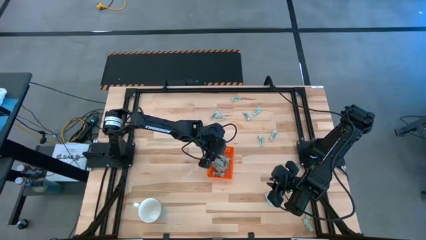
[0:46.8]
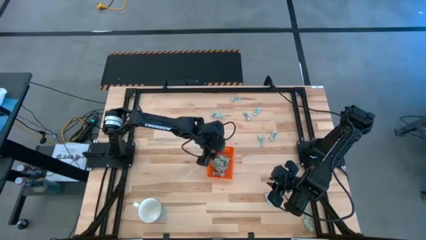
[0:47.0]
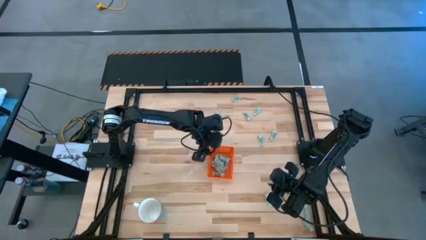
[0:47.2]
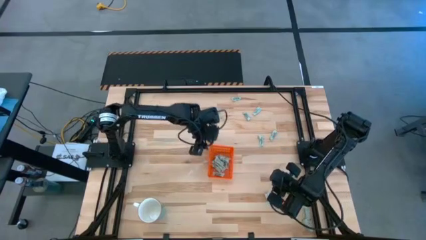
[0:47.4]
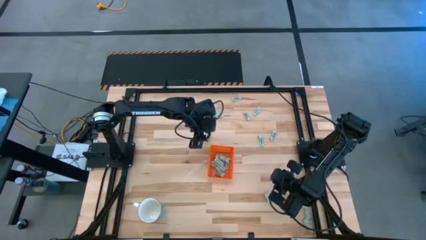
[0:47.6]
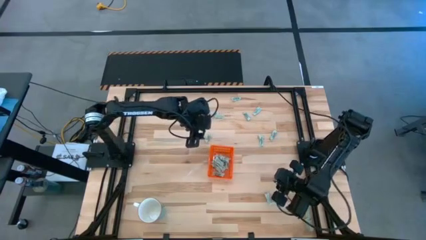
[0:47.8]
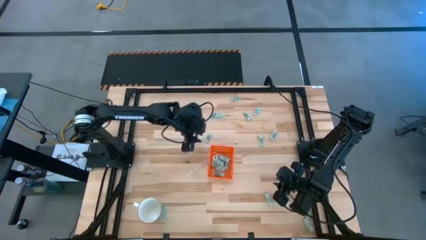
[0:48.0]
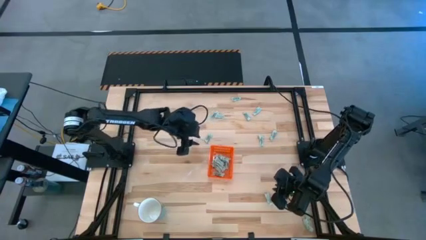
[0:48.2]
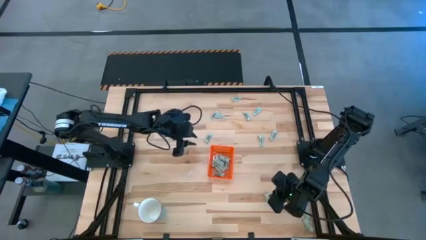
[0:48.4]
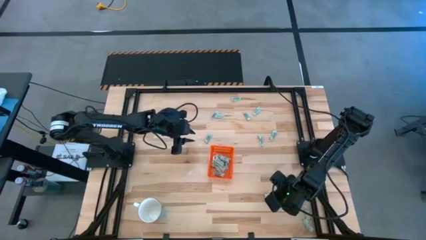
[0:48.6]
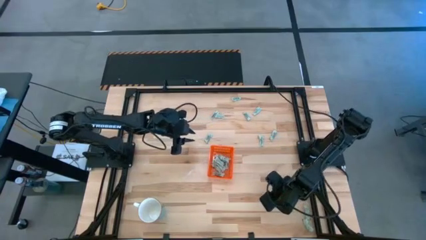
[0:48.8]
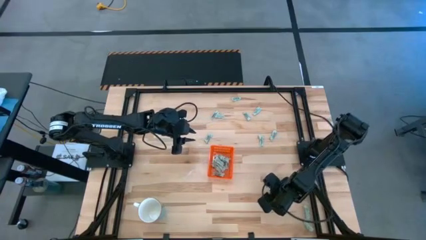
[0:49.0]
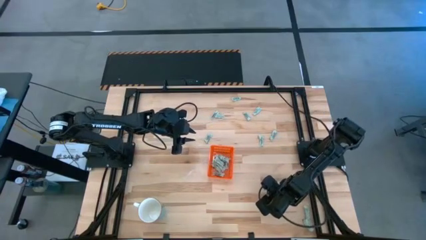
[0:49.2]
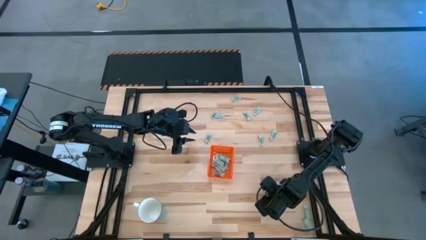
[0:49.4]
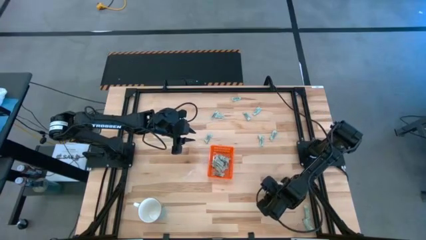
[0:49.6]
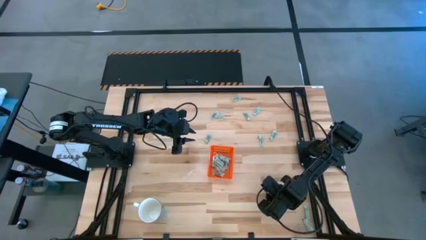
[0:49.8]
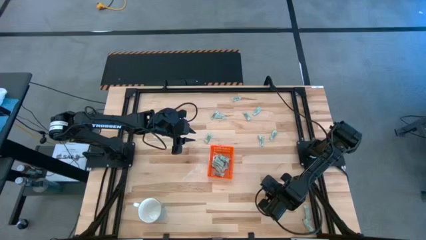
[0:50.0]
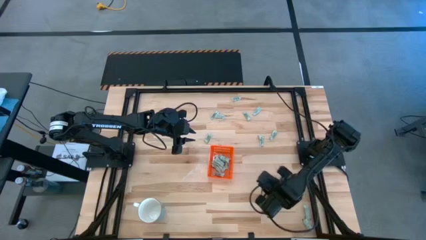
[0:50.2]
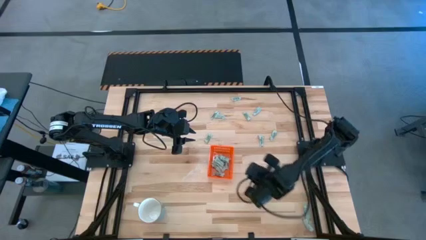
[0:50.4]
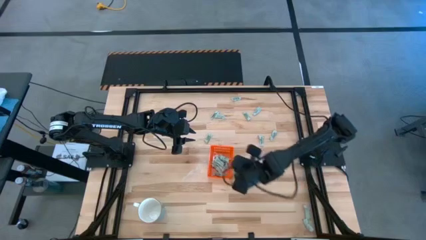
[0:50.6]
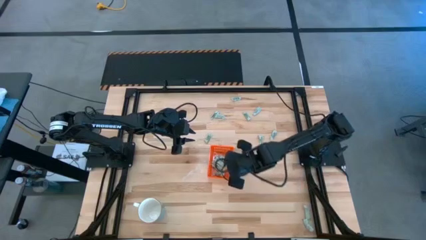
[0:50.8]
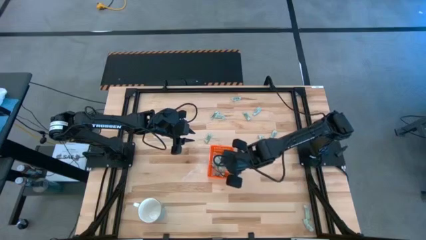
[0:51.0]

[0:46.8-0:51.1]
Task: Pick and place Stevia / Truvia into bins
Put the stevia packet into the orange bin

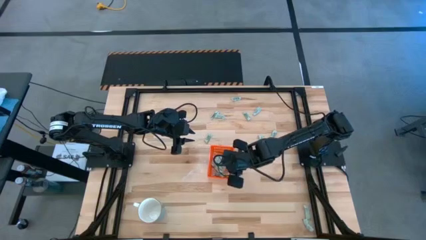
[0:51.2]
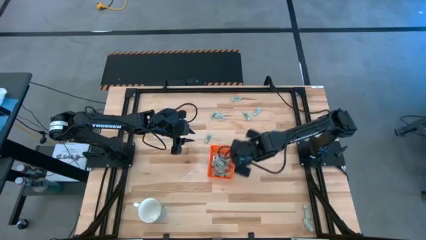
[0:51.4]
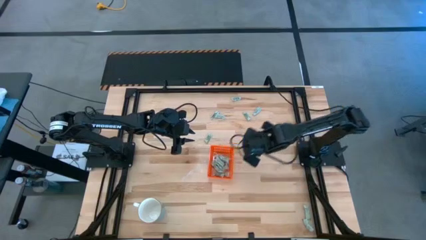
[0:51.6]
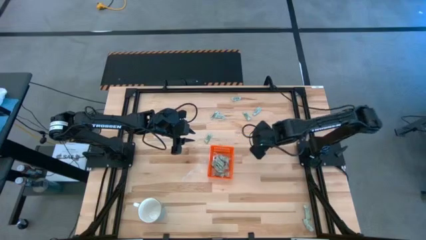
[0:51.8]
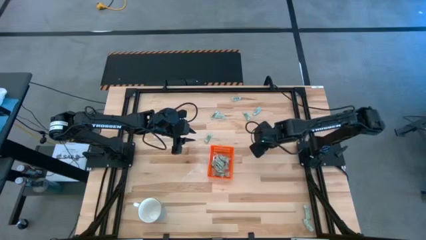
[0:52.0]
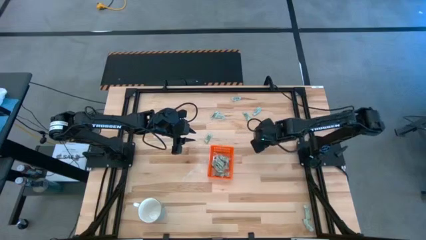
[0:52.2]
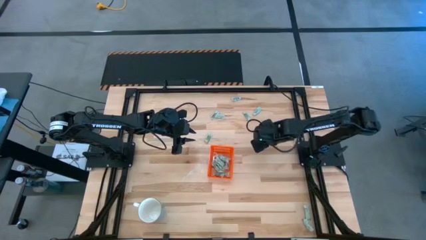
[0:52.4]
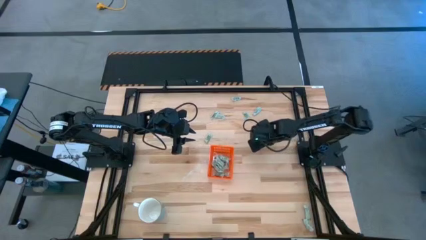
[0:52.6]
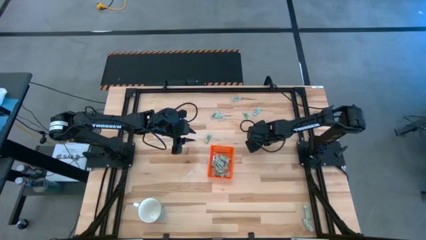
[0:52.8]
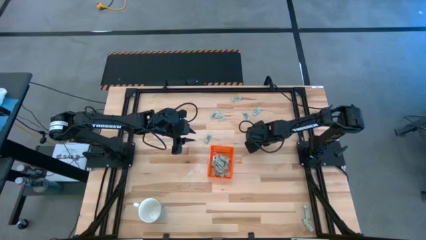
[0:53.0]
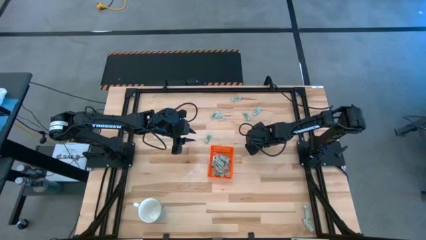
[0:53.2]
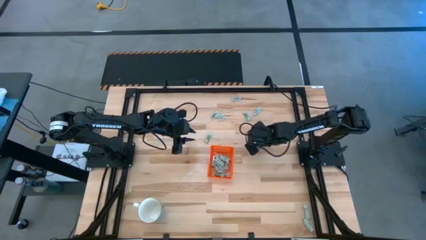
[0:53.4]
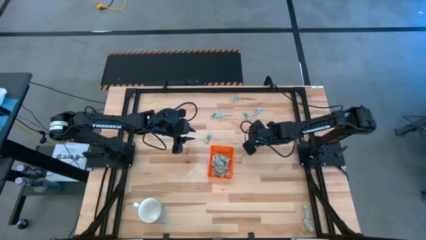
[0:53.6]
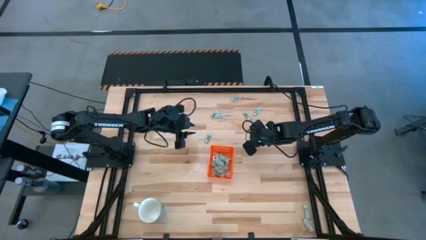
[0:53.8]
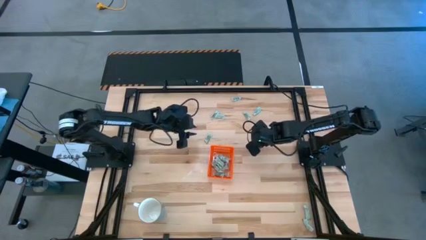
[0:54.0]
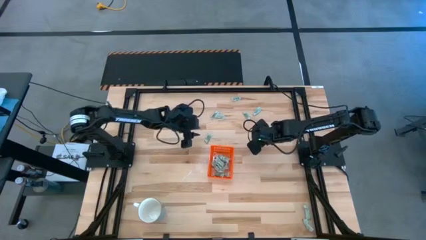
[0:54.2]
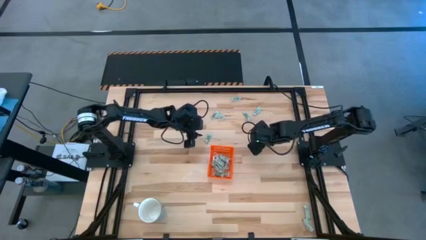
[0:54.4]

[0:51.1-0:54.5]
Put the stevia packet into the orange bin

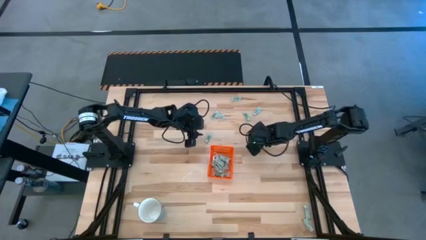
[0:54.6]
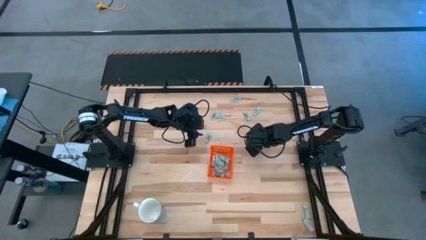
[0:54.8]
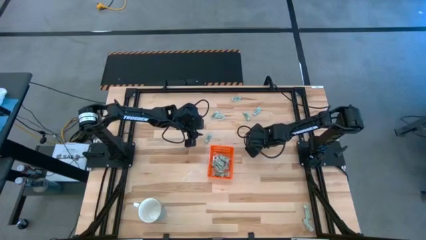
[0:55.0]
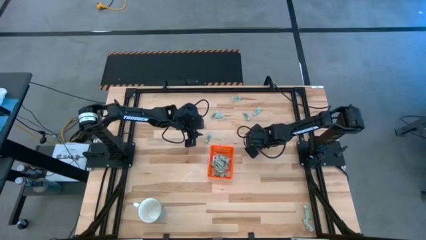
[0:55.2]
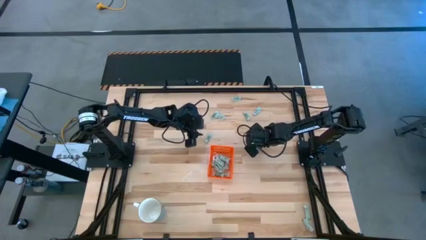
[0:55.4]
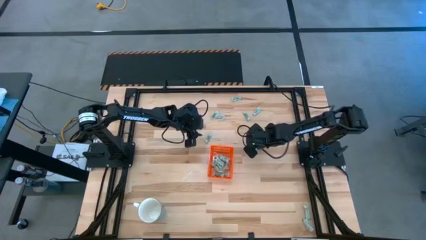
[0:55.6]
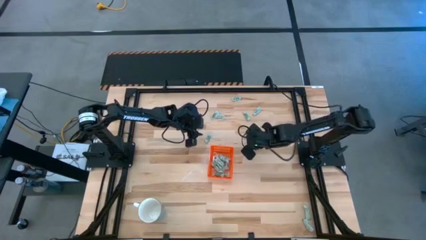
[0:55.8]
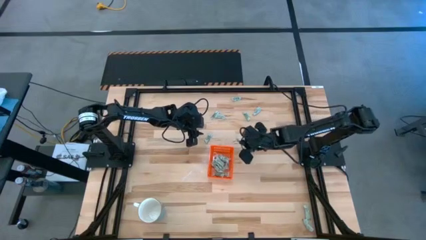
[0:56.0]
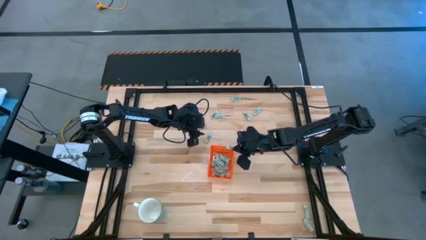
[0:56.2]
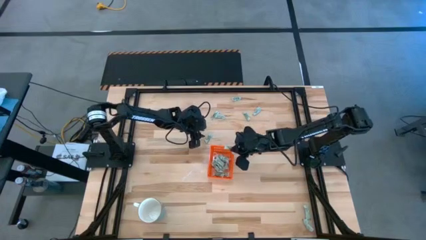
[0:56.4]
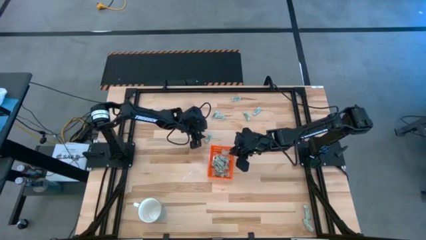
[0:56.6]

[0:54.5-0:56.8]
Put the stevia packet into the orange bin

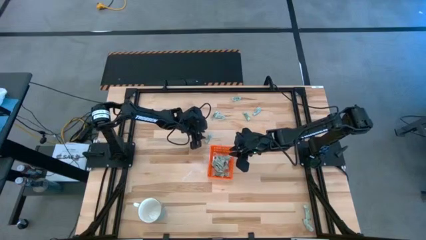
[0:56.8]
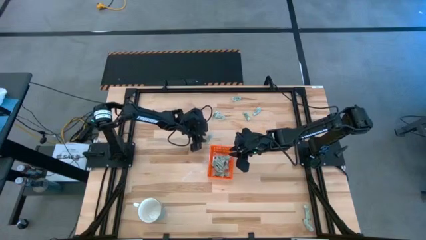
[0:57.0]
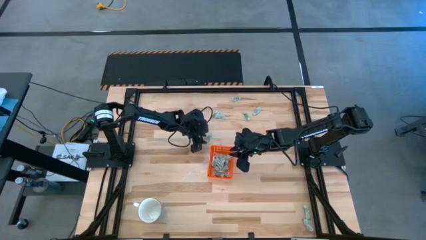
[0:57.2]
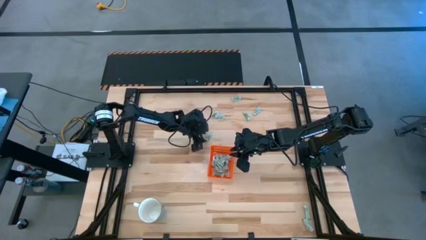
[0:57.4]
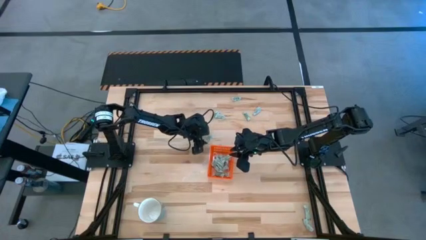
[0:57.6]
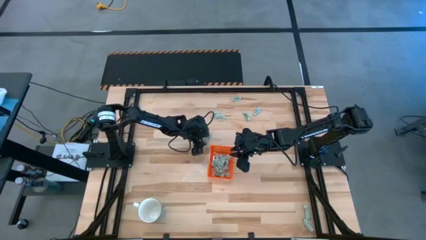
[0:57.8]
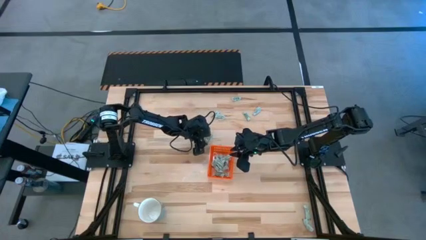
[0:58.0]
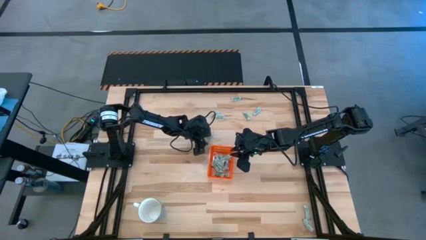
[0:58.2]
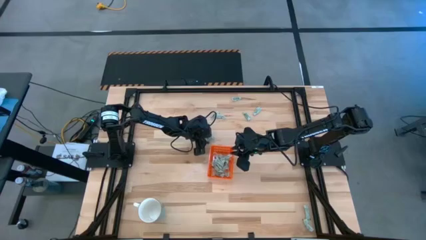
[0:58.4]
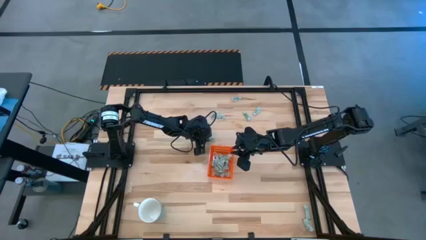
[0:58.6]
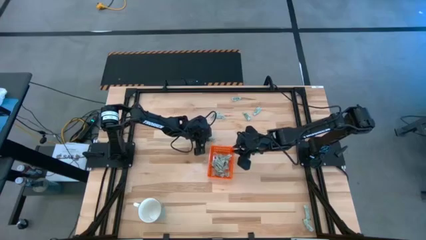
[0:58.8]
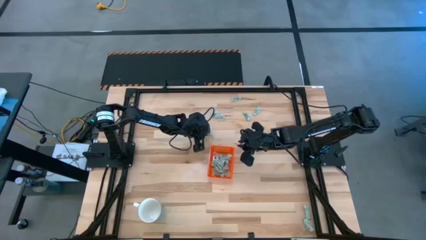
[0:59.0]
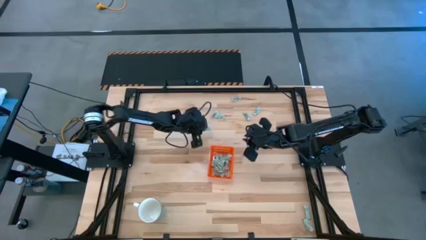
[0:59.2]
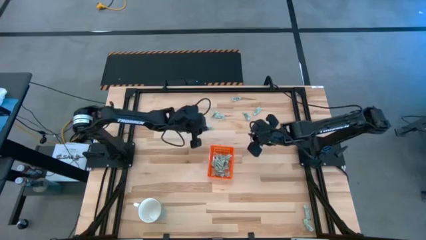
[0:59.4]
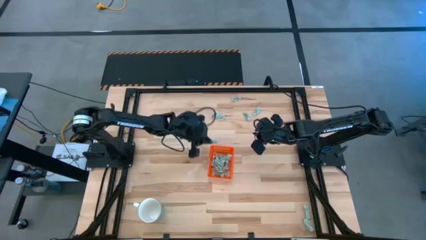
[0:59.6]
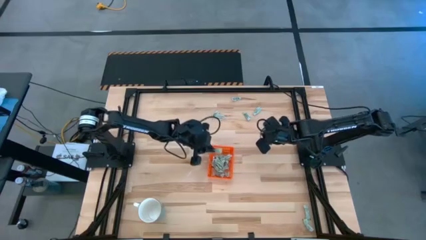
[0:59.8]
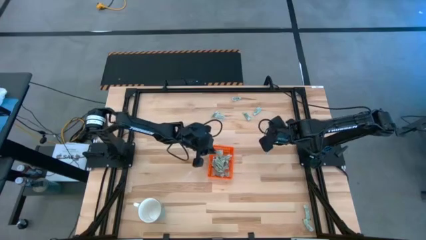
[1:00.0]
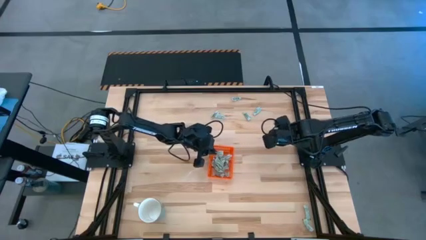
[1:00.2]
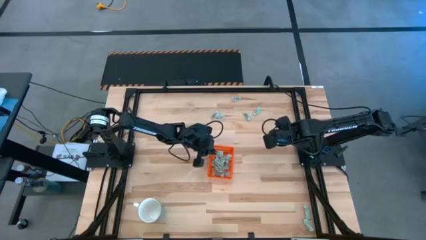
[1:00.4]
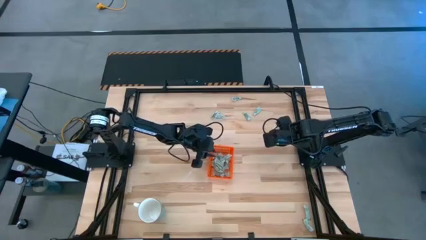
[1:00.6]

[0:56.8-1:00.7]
Put the stevia packet into the orange bin

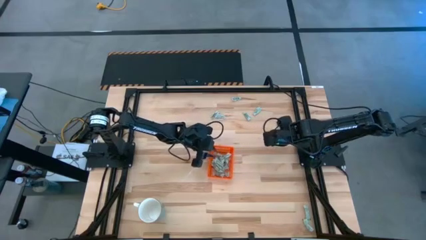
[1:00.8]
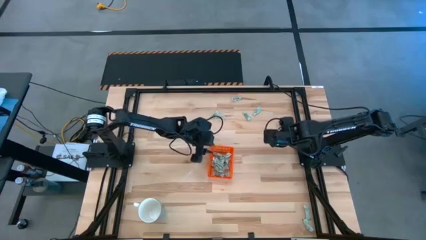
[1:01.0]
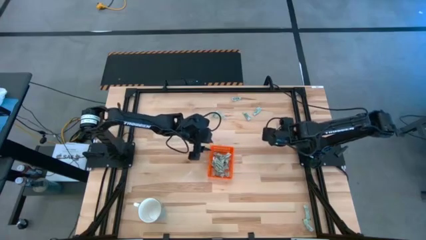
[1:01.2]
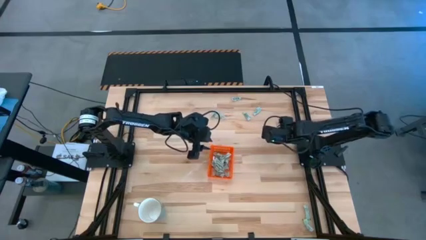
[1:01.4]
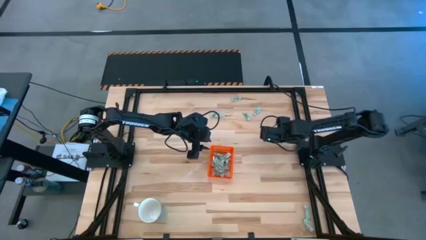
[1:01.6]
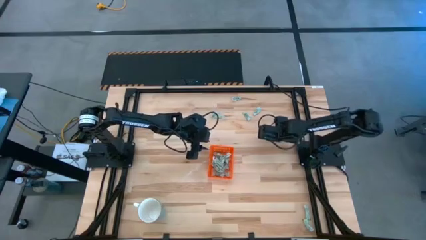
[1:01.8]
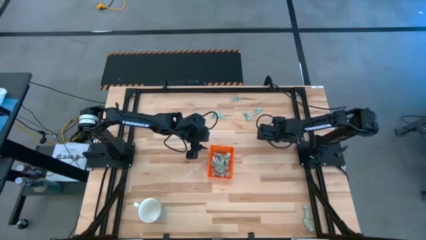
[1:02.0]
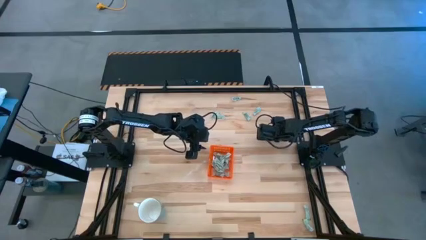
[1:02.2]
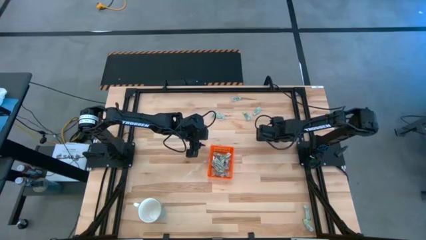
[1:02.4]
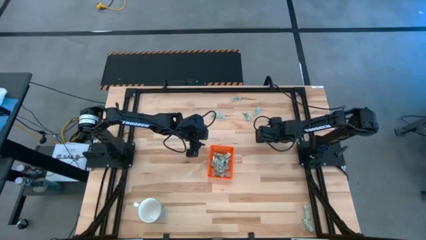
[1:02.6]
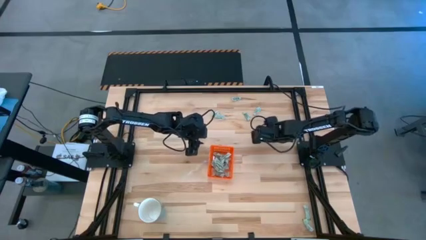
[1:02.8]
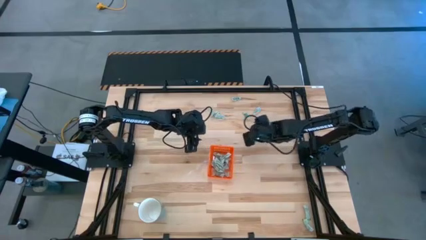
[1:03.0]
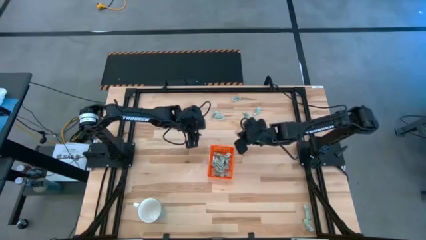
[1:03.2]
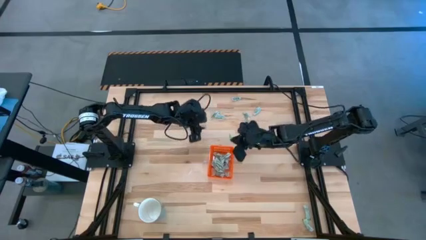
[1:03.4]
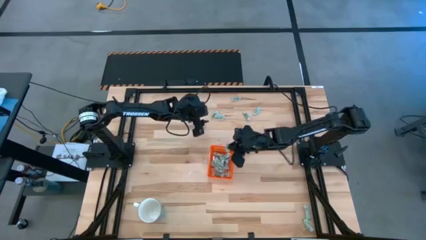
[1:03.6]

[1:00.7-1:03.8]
Put the stevia packet into the orange bin
